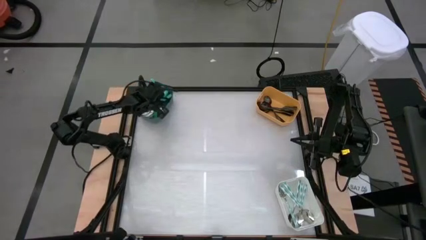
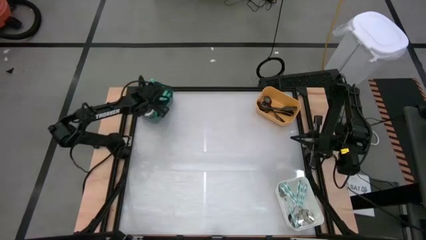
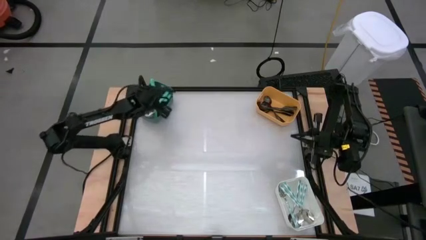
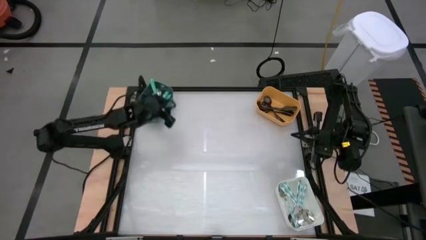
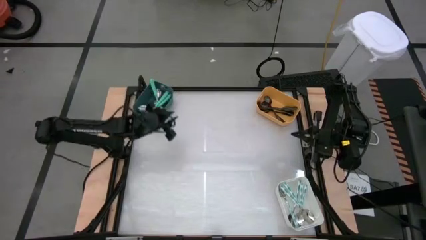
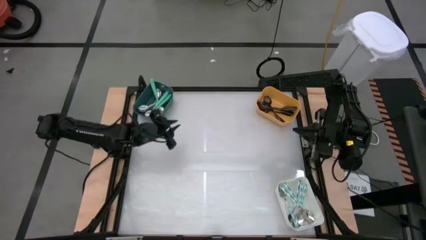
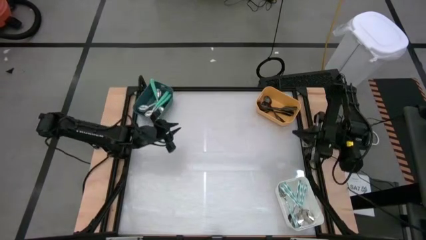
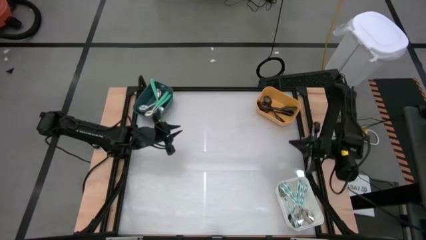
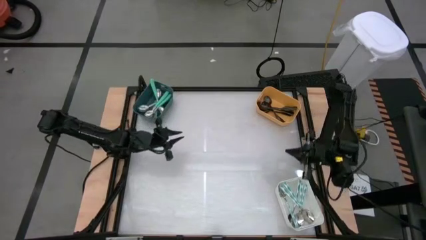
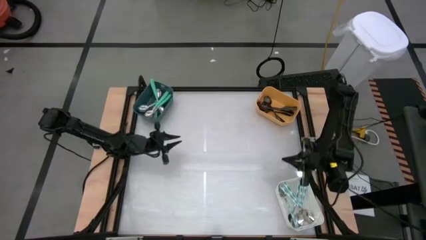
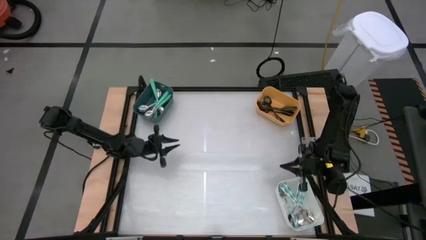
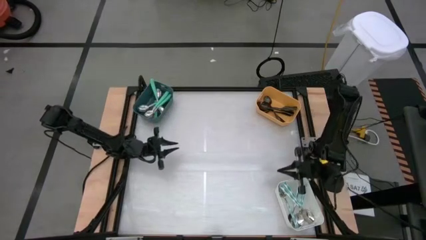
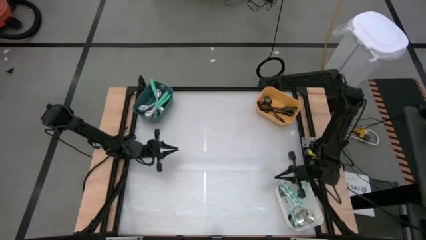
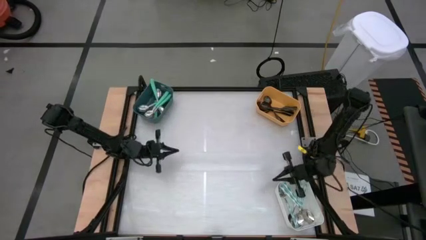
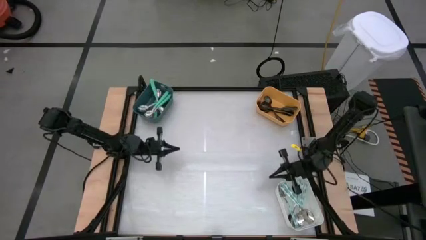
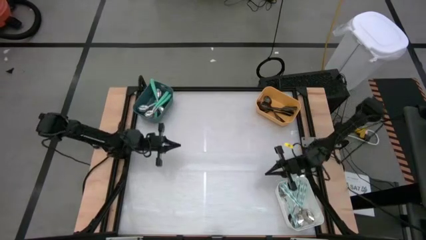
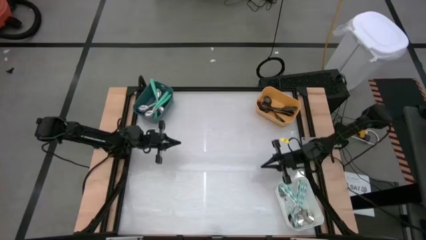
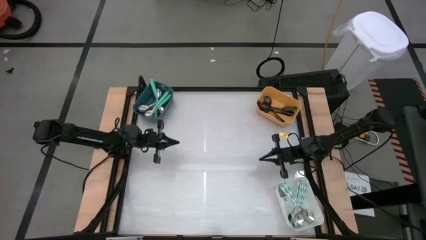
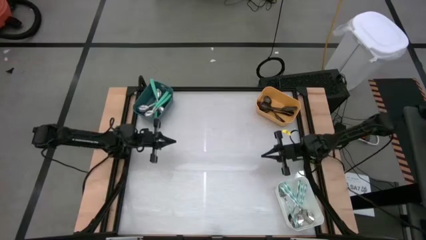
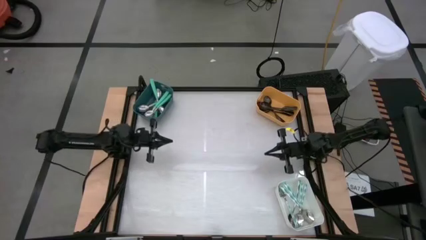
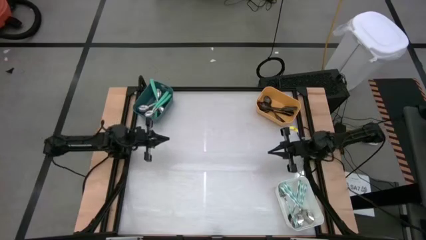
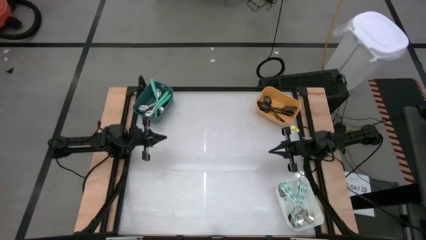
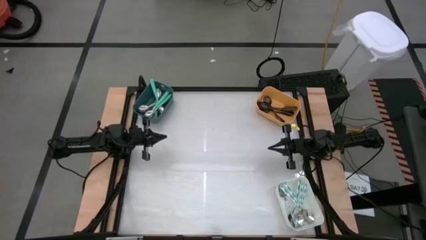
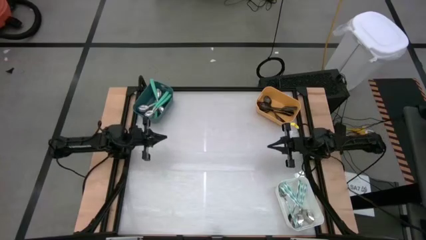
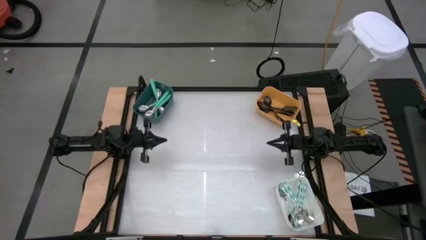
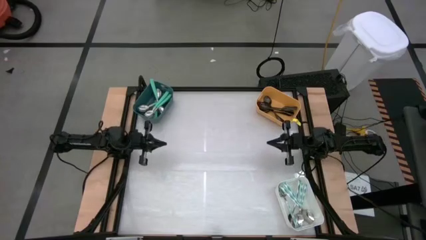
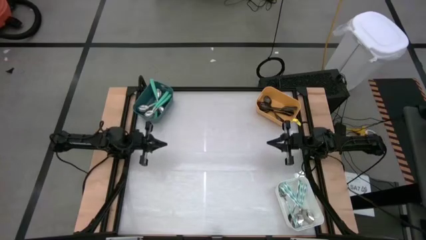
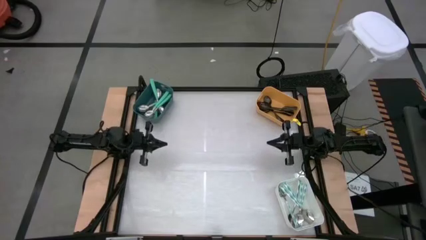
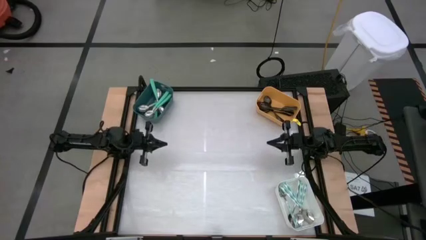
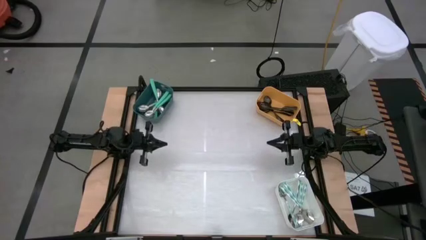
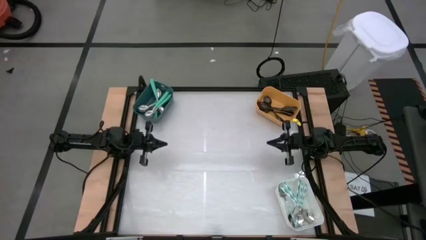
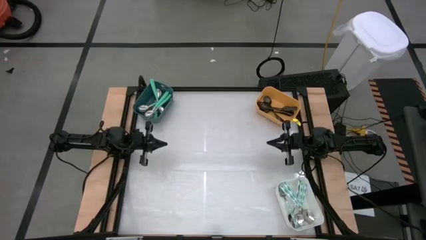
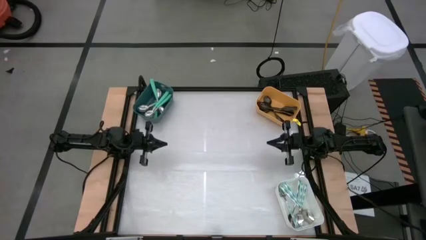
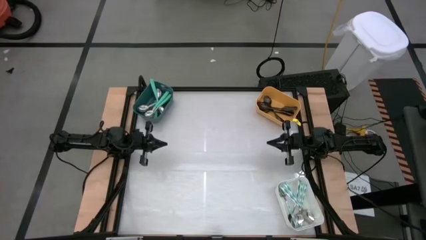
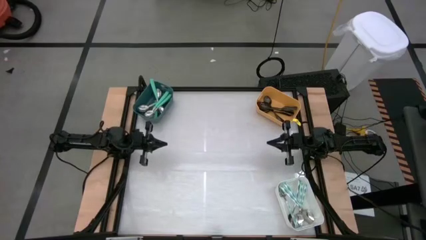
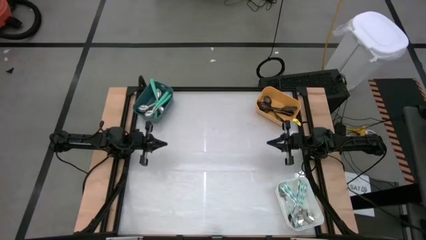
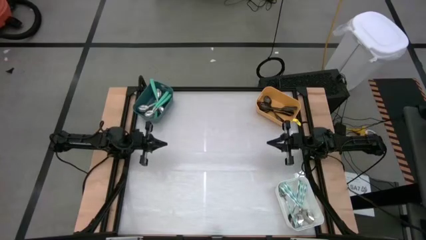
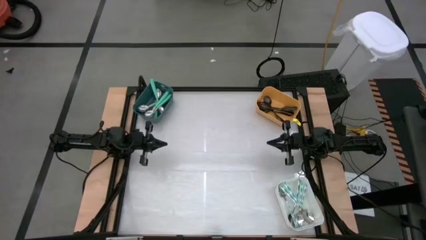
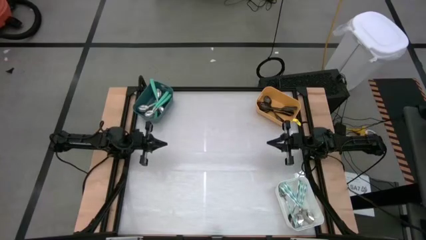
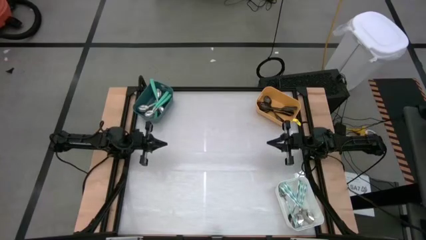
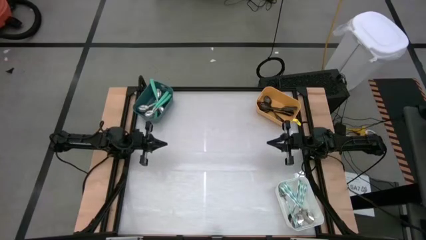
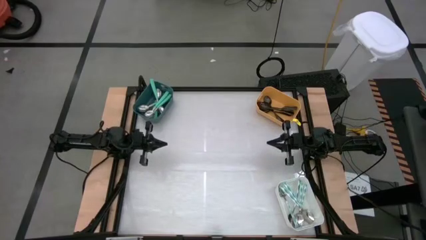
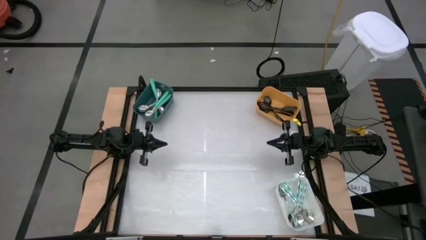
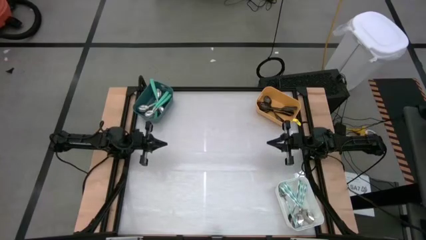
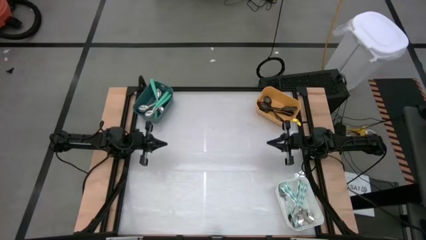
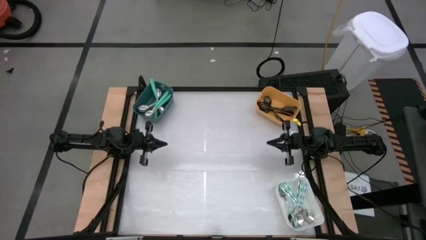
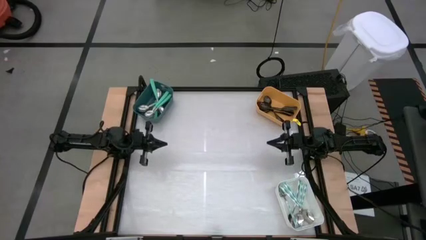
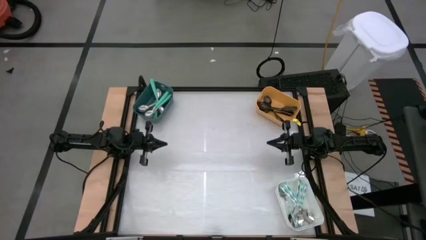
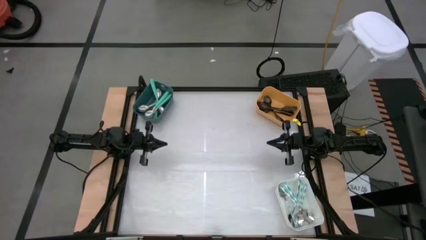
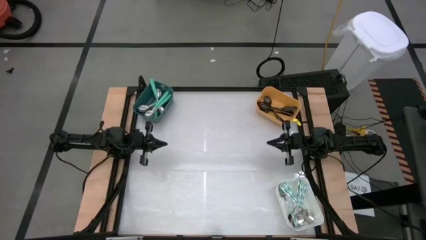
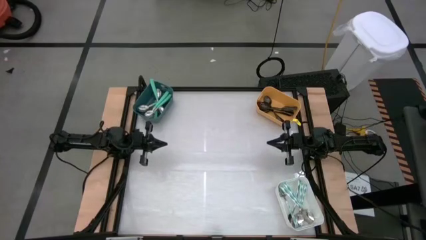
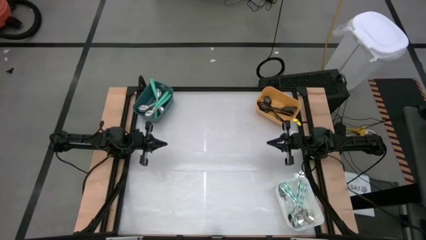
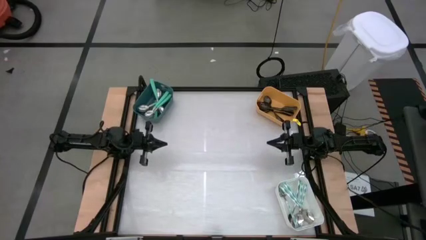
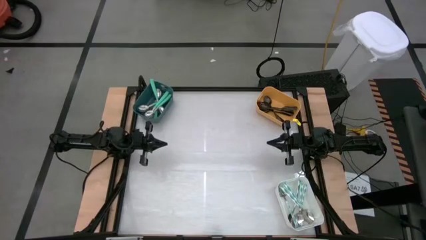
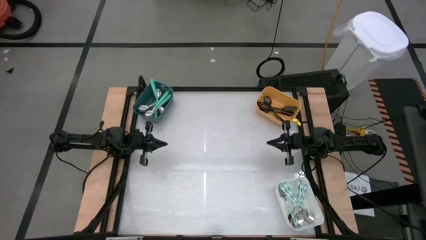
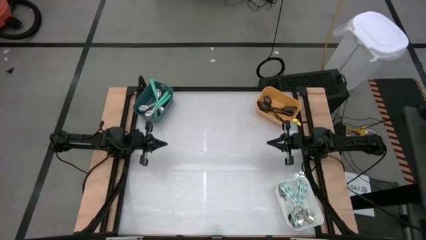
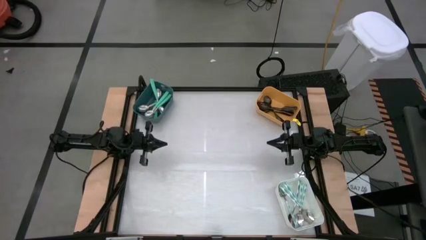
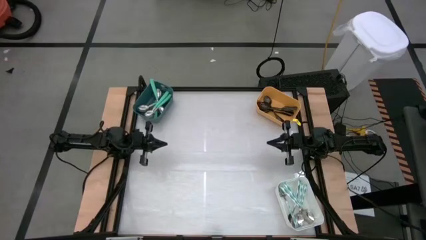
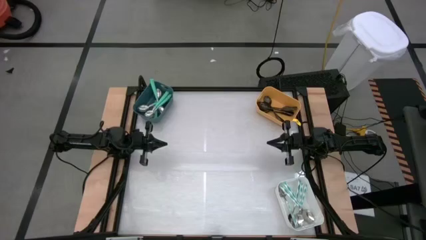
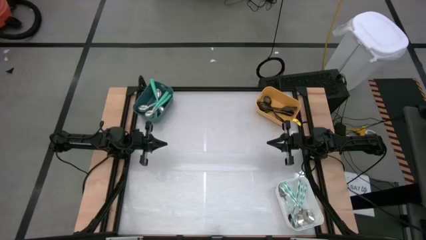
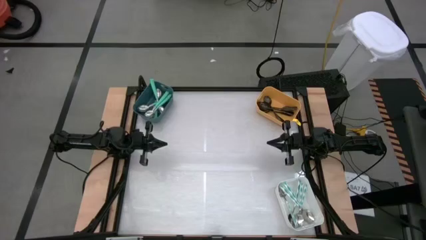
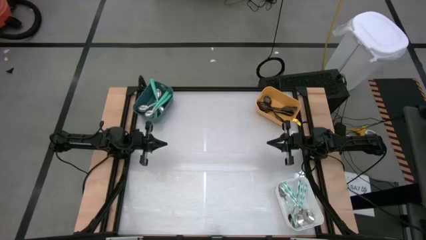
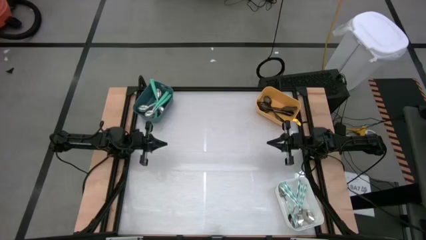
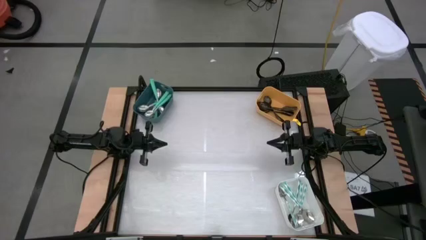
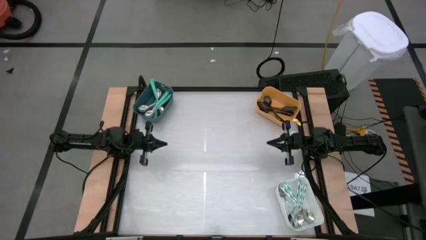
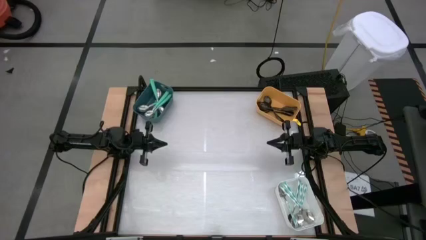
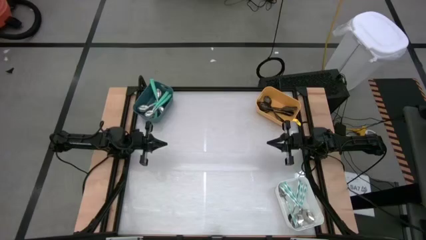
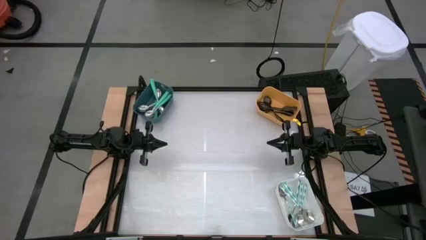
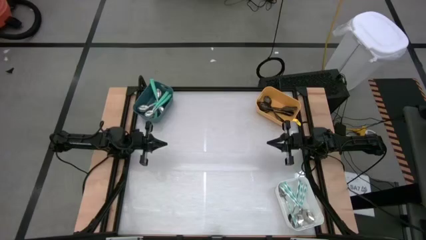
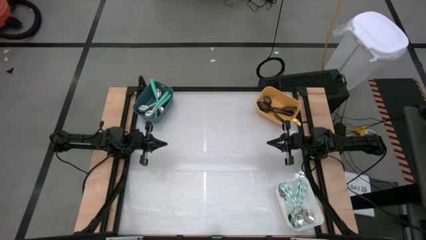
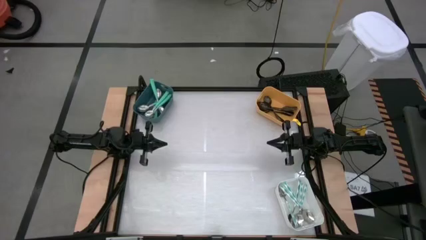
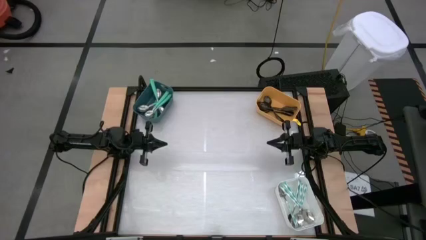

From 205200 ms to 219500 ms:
Task: Sort silverware by color (type)
Return to Home Position

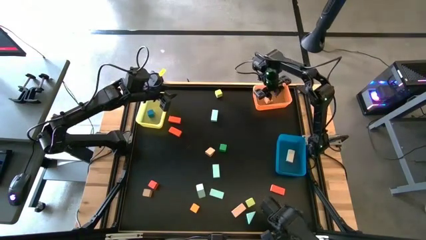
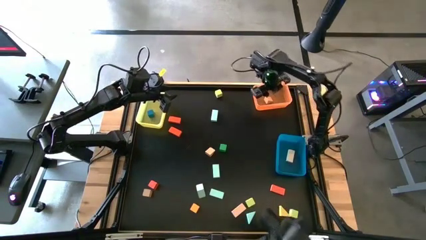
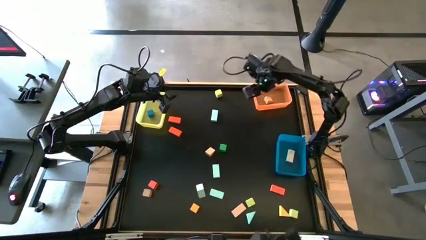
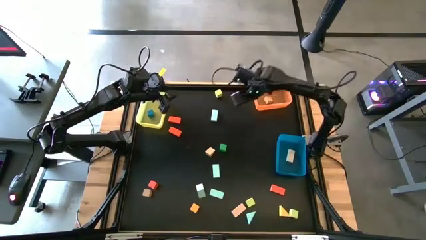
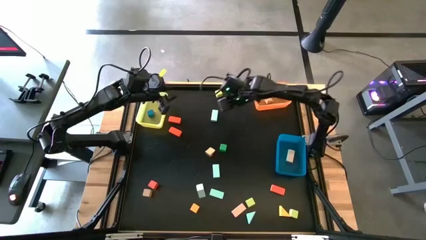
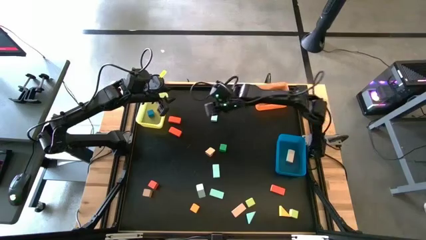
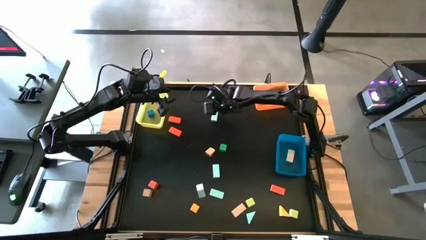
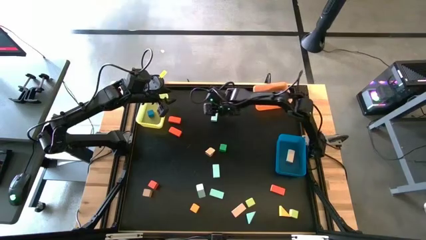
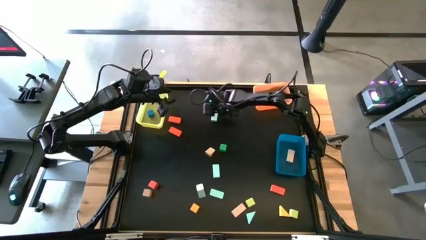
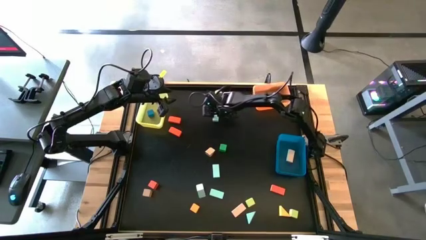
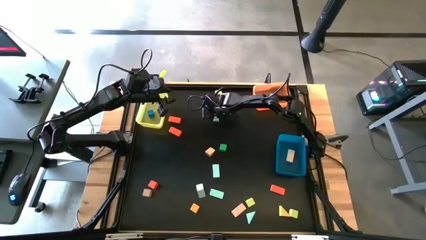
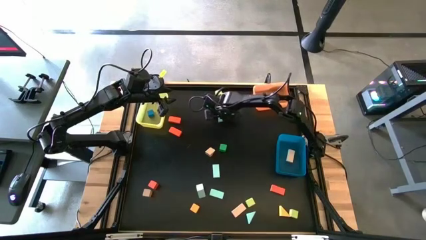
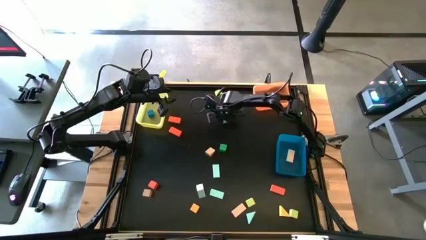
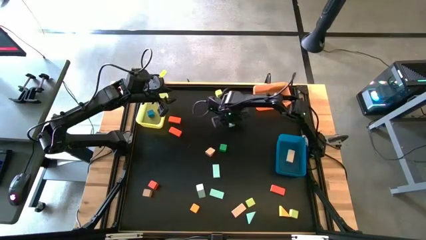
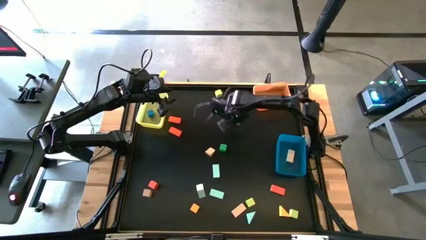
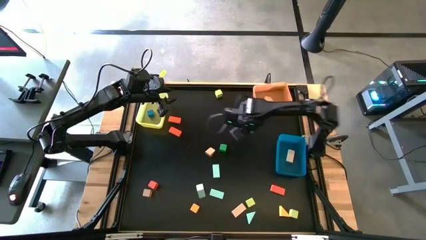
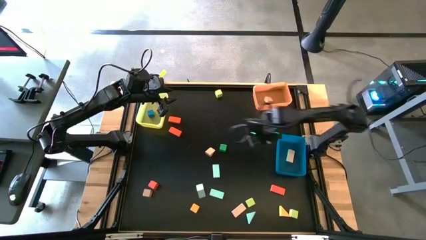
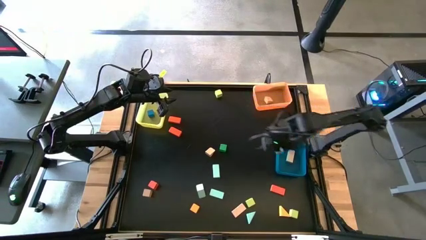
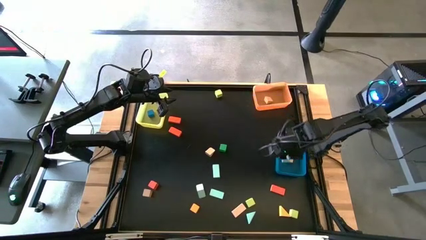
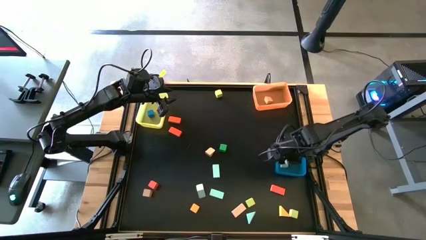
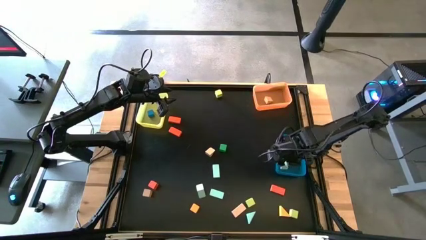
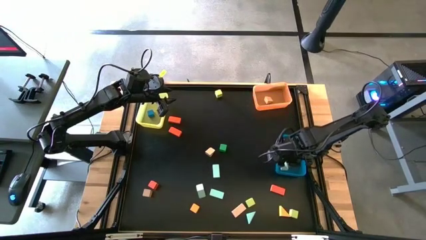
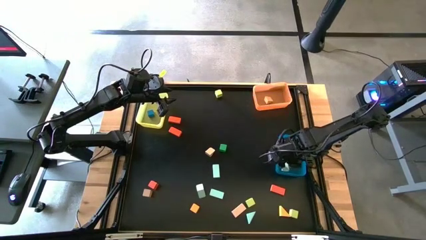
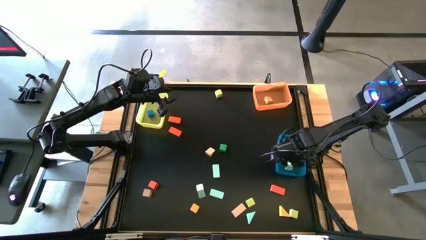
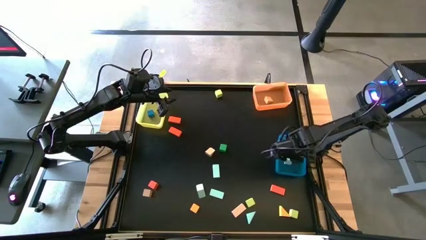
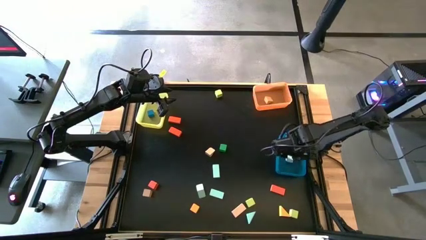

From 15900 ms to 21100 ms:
Task: Sort blocks by size
Put the blue rectangle block into the blue bin
